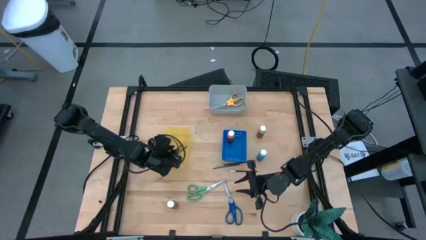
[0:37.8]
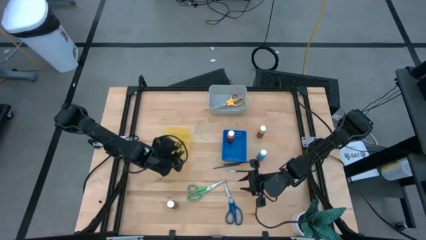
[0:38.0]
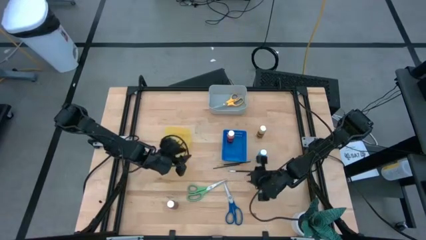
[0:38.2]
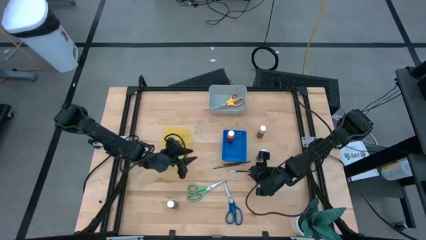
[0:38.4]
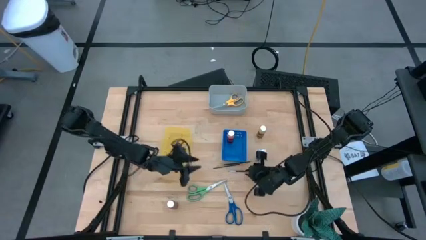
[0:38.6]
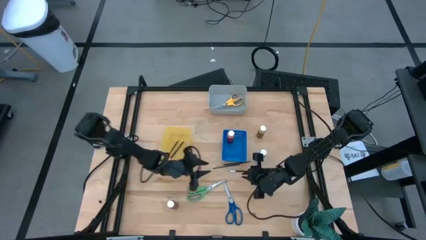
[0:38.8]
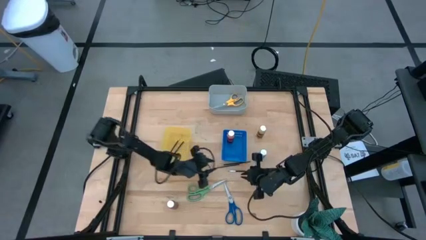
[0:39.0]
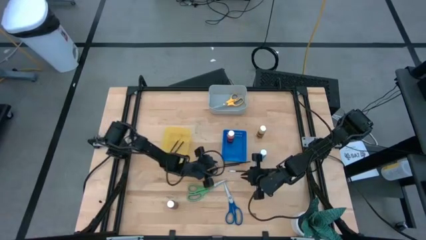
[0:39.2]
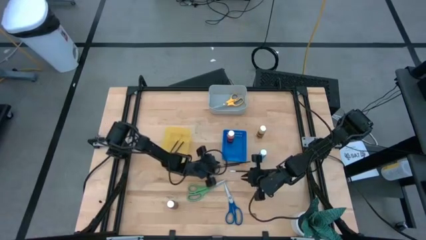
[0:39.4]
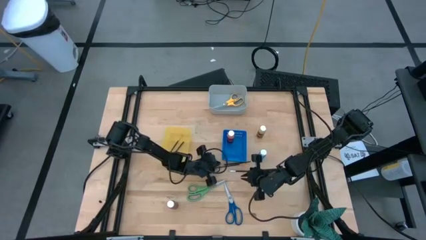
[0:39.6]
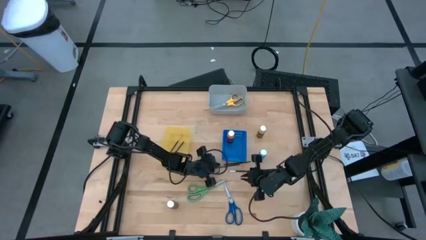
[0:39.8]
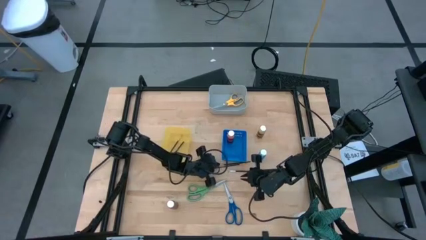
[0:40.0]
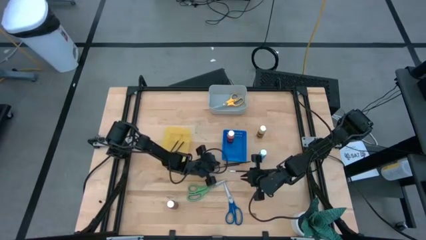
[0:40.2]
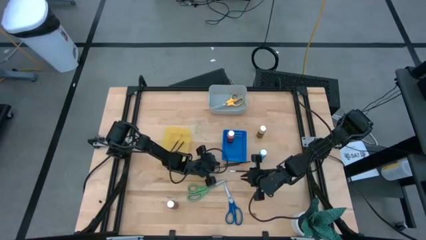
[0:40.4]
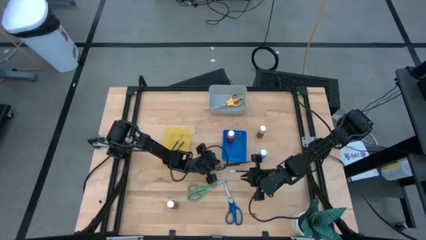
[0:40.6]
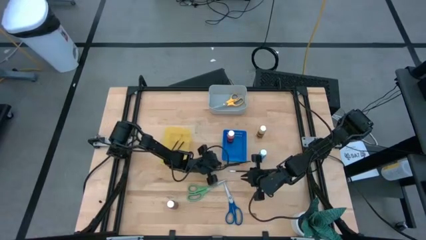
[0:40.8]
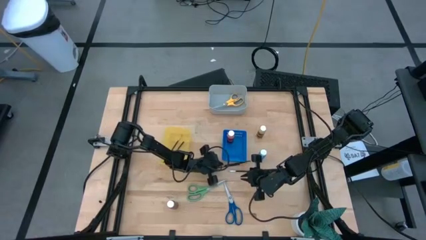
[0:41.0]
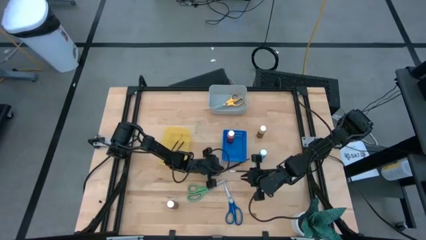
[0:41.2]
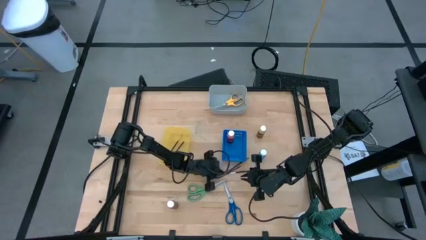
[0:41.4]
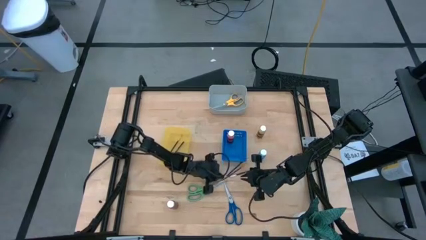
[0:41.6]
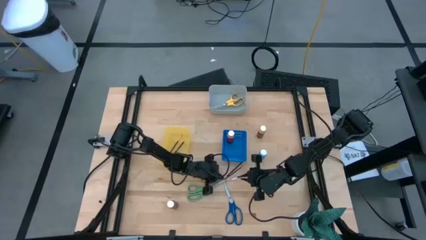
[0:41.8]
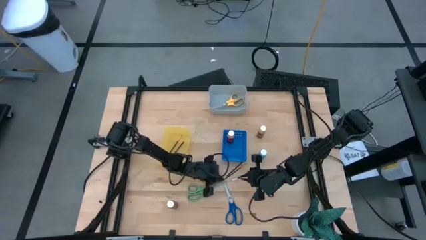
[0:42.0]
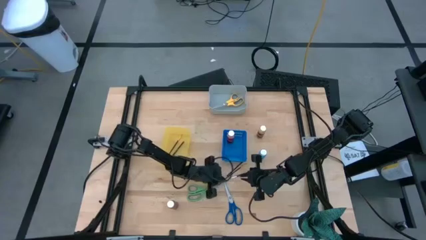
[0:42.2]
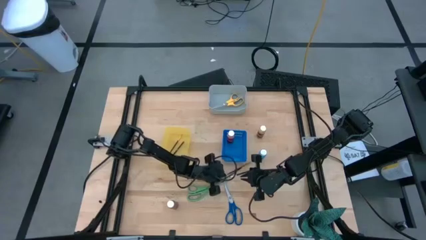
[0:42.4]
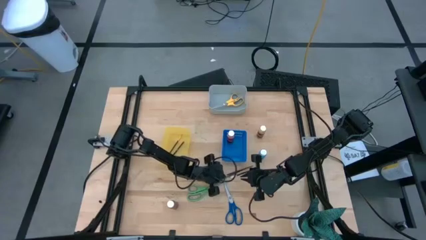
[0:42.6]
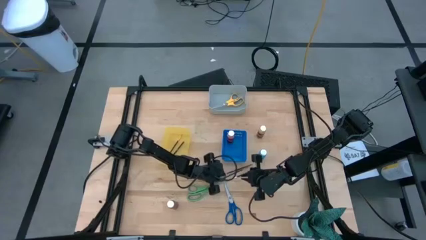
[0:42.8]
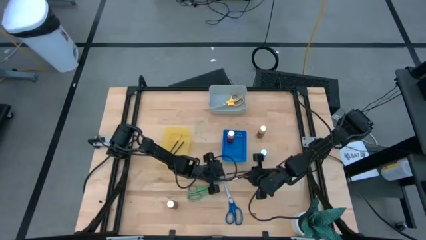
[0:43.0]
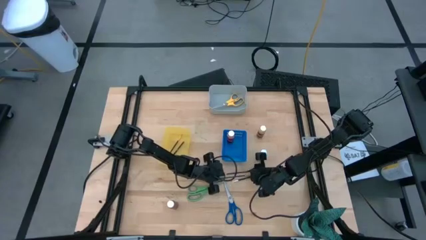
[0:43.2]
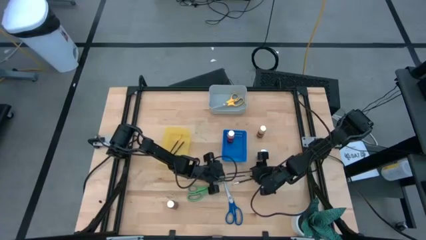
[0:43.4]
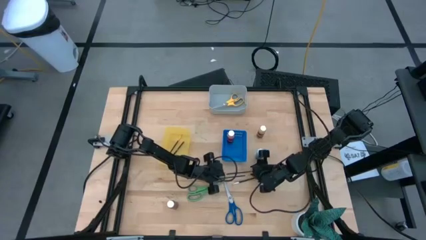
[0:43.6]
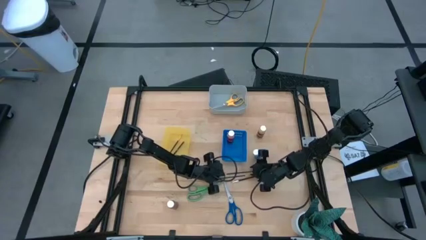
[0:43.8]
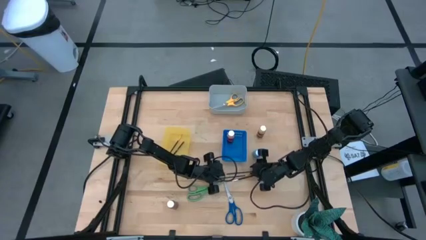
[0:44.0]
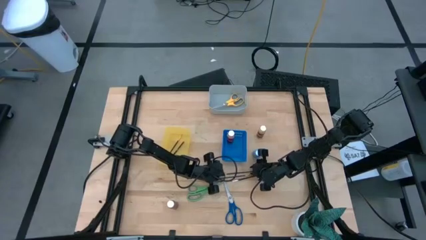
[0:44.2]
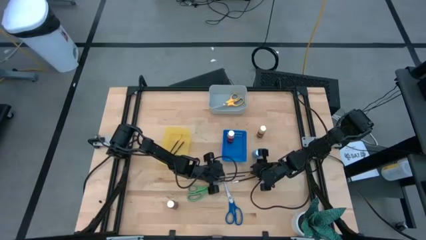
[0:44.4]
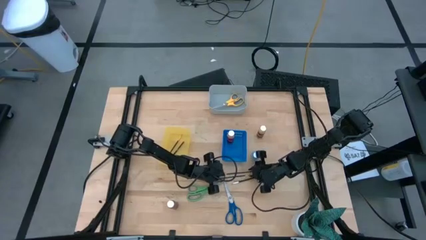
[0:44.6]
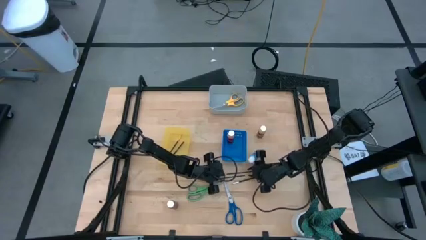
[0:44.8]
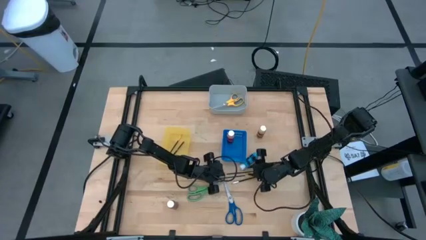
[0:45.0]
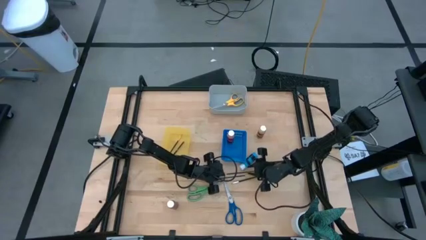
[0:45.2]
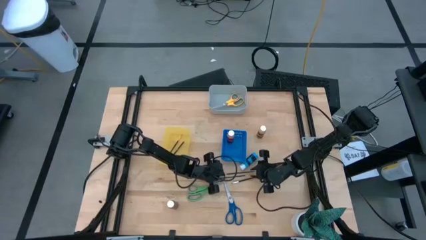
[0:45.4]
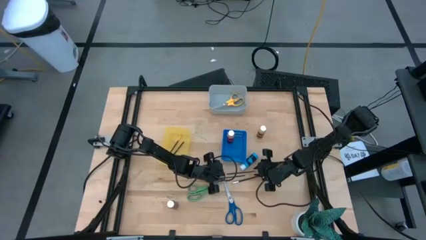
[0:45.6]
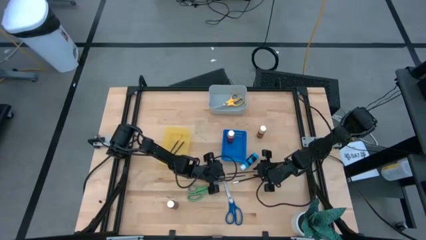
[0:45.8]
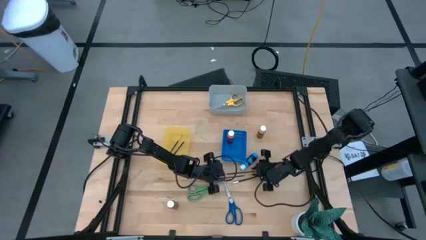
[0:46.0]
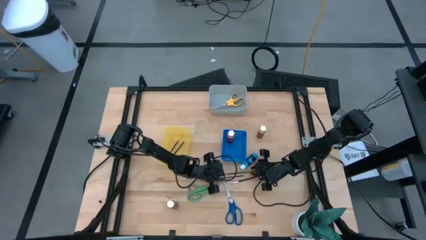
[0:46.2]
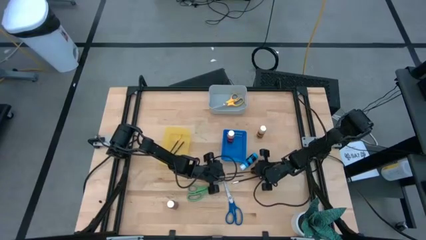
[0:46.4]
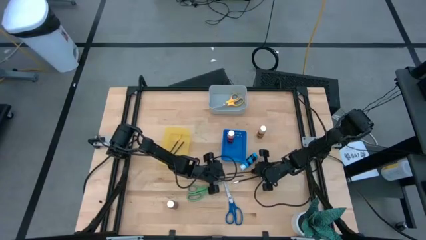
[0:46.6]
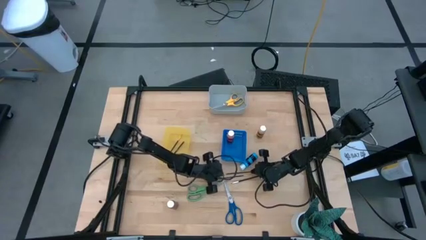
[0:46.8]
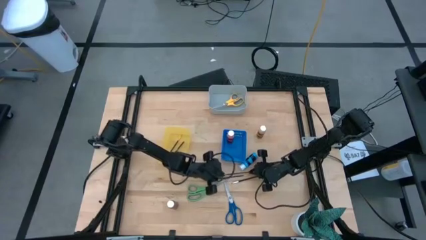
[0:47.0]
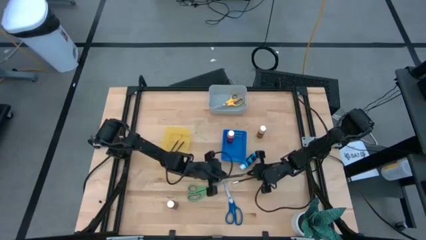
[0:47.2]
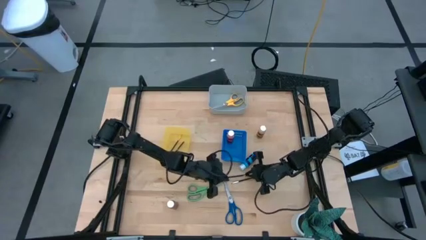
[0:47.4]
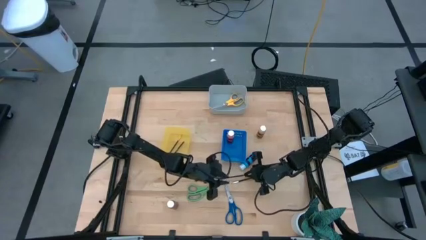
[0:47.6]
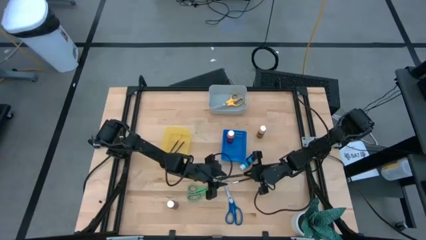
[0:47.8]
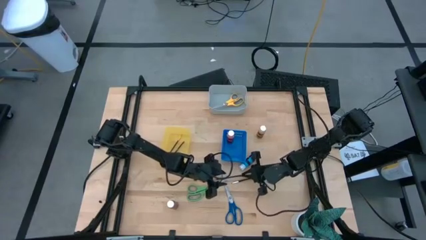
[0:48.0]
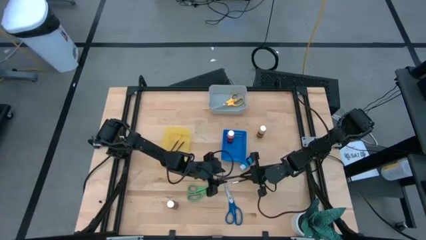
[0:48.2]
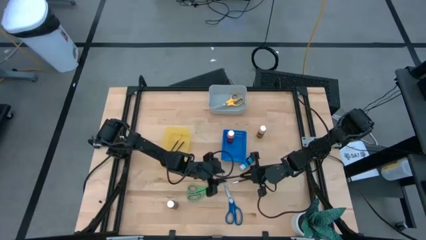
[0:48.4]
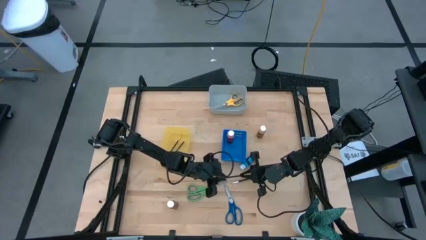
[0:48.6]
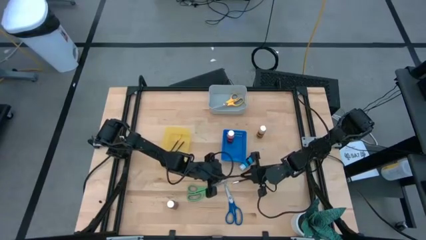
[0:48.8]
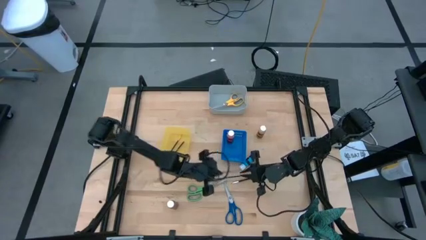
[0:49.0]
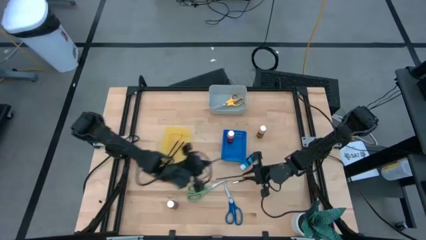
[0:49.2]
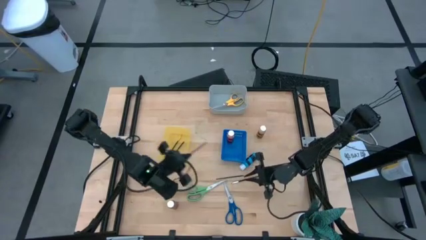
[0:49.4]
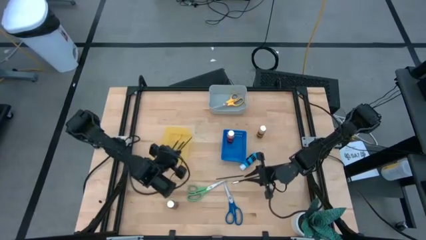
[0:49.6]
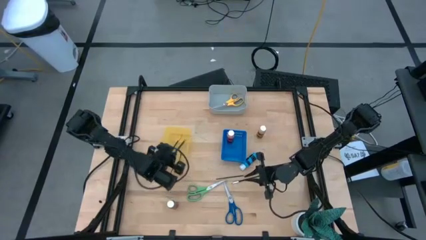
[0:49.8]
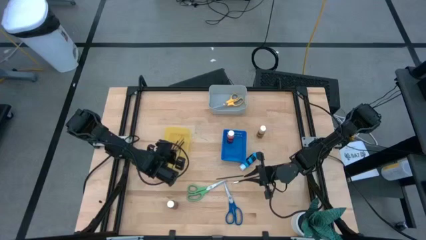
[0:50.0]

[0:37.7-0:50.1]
Task: Pick & Place Paint Supplies
Put the top gold paint brush into the yellow bin

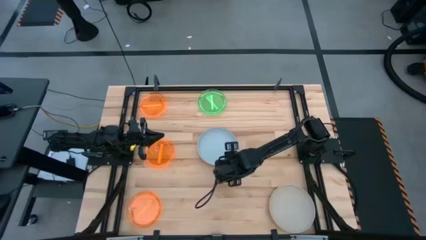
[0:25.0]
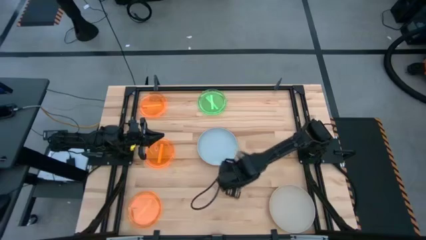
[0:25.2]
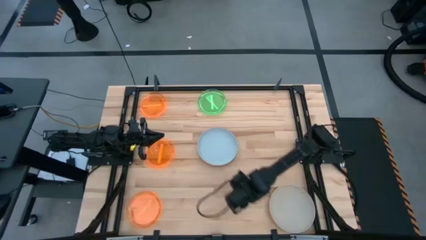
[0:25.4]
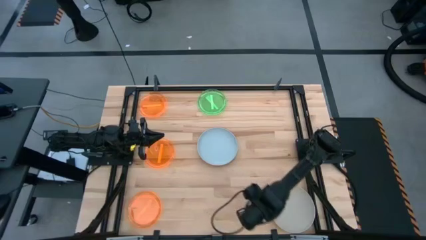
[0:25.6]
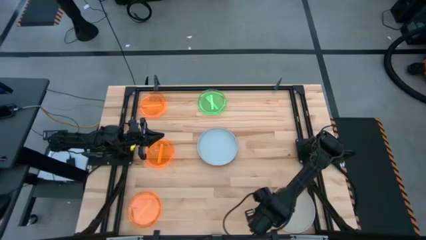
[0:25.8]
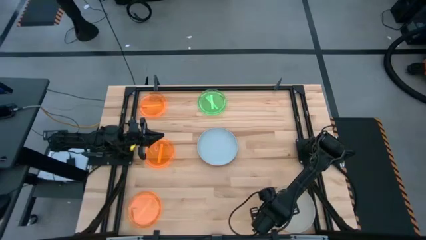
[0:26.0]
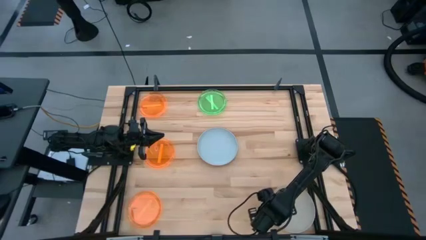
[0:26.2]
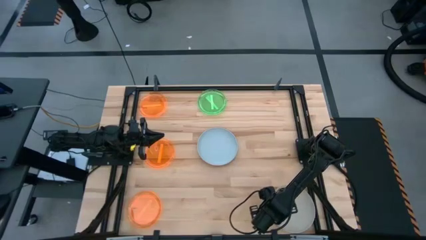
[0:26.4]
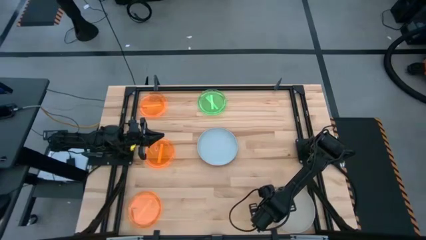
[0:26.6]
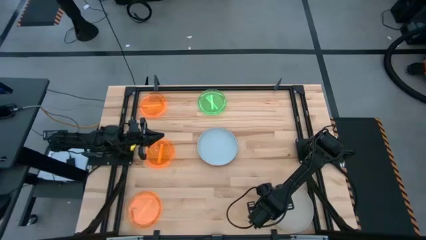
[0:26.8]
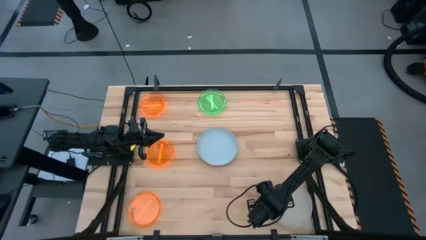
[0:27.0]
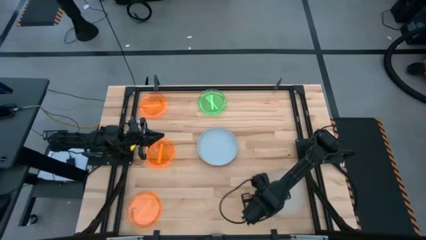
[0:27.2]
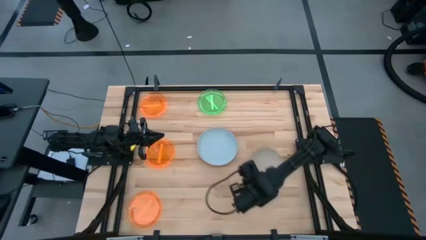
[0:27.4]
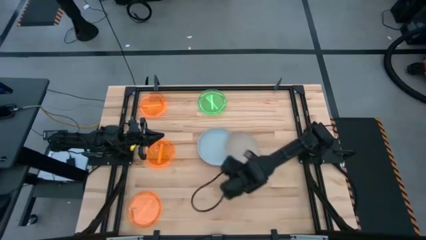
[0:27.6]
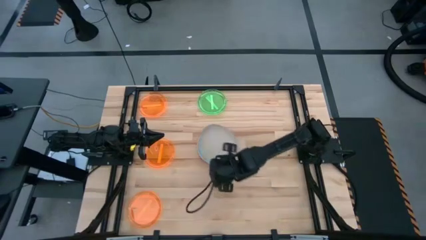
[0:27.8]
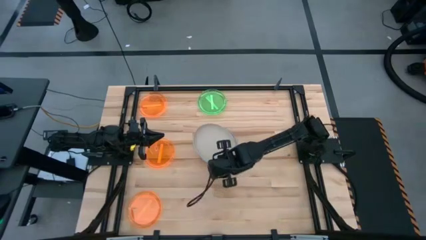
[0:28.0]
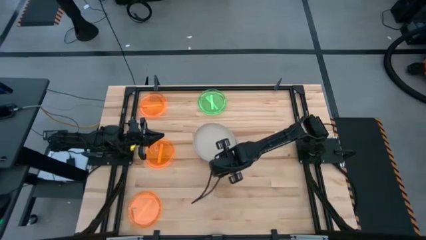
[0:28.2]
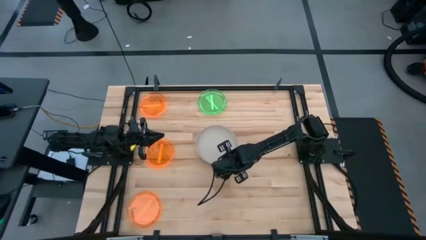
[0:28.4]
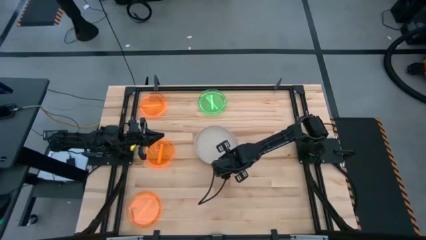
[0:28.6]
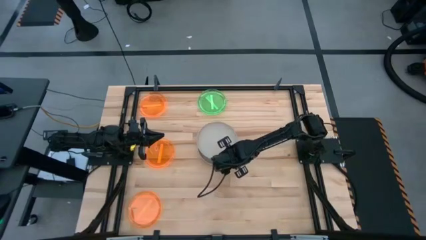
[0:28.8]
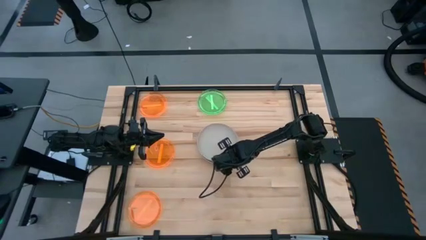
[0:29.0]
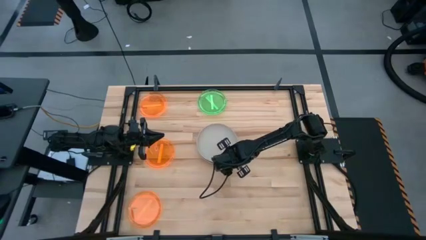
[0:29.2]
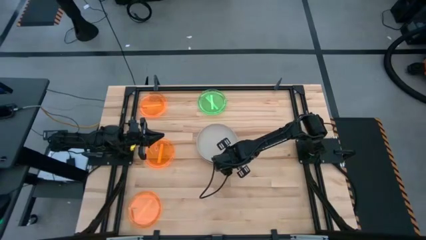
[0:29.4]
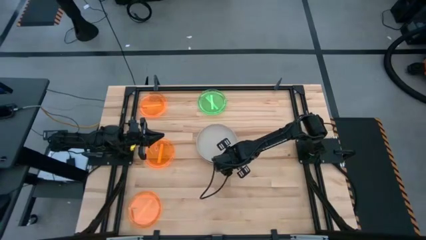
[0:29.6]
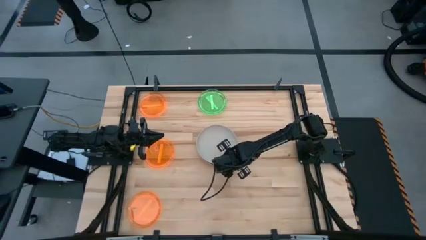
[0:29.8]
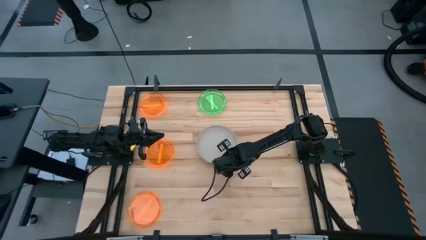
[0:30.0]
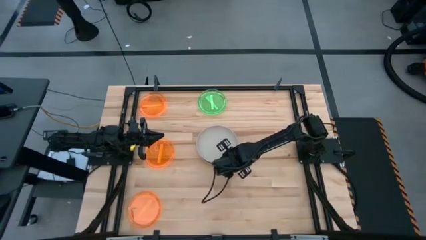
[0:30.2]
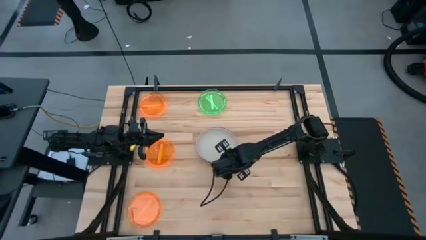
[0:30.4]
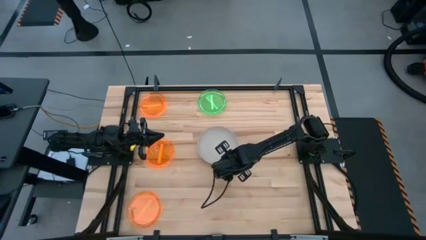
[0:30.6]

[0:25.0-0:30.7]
Task: Stack plastic plates
Stack the brown plate on top of the gray plate
